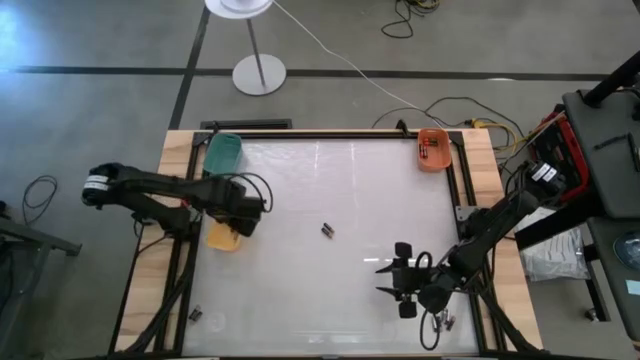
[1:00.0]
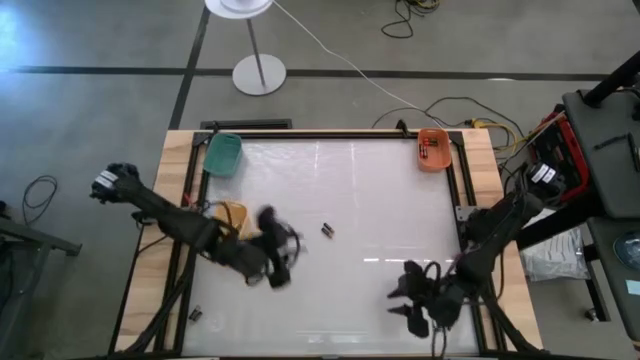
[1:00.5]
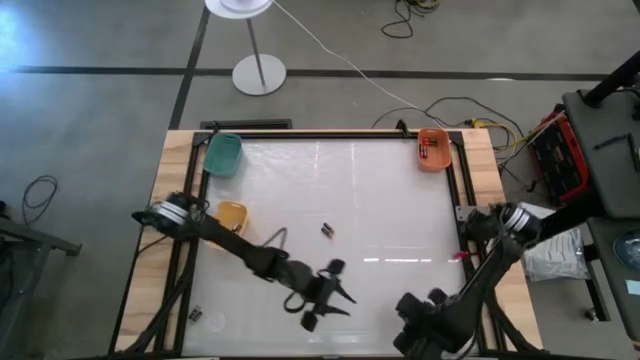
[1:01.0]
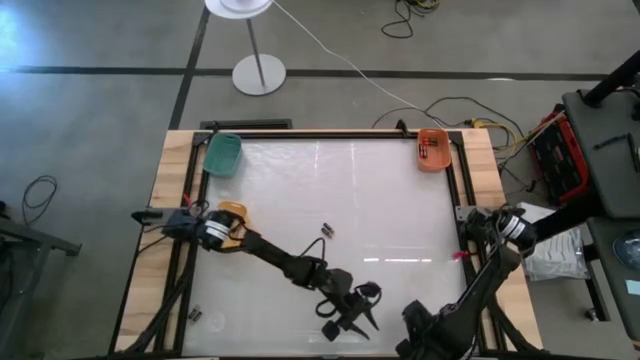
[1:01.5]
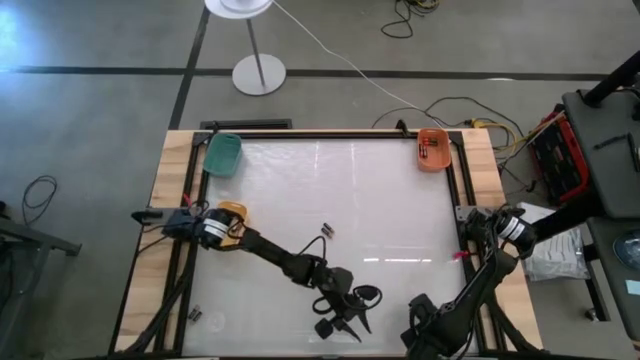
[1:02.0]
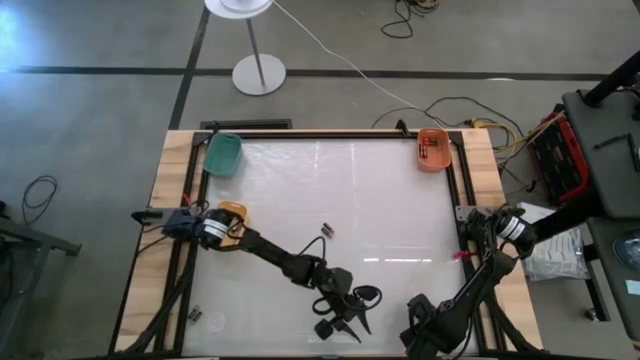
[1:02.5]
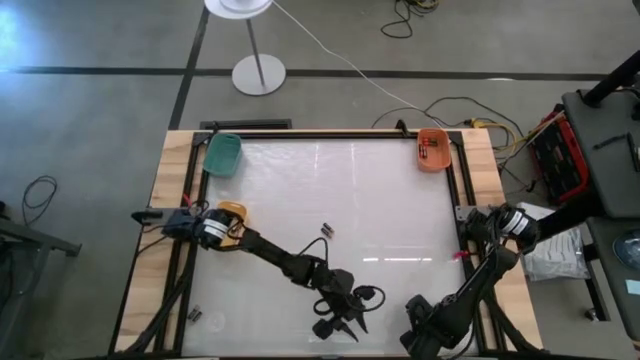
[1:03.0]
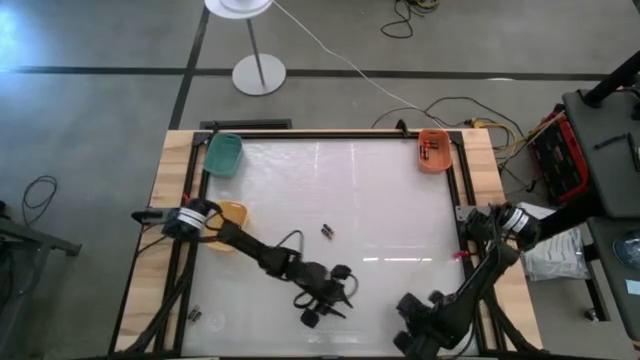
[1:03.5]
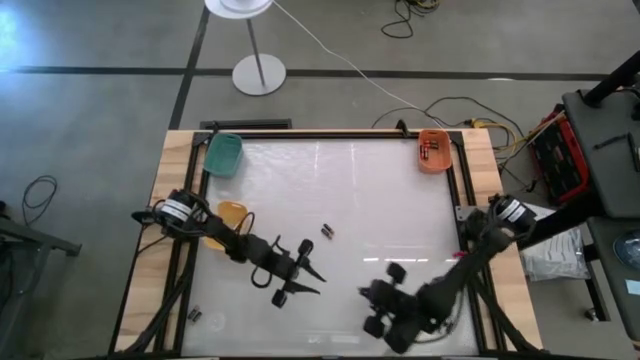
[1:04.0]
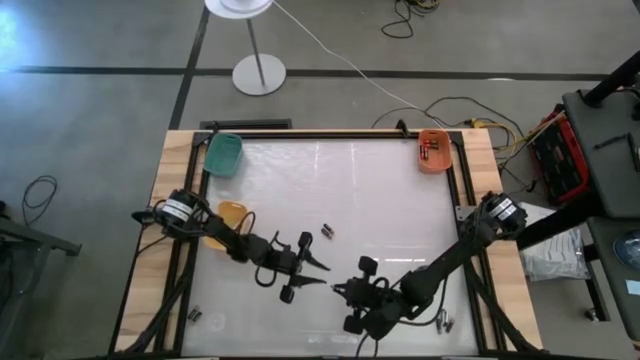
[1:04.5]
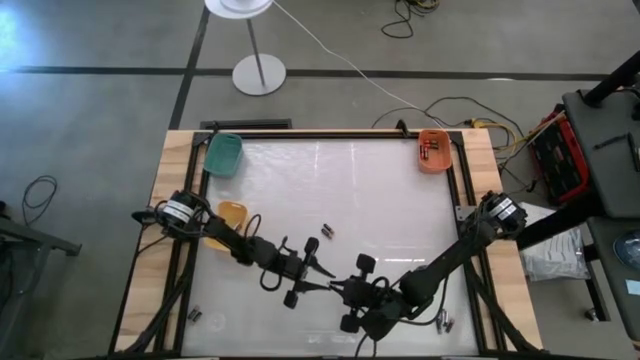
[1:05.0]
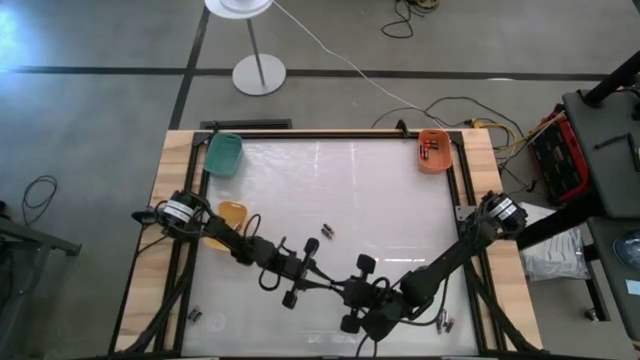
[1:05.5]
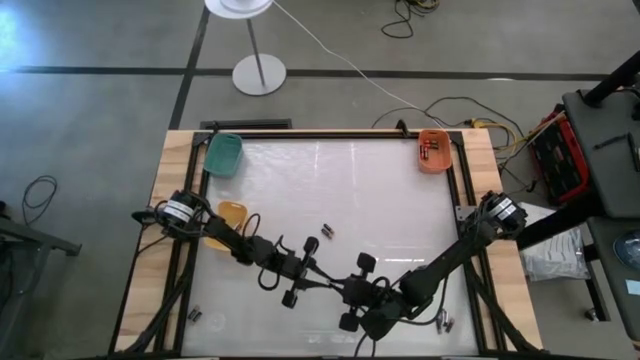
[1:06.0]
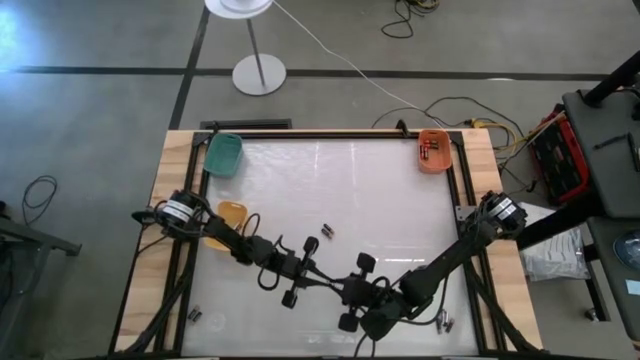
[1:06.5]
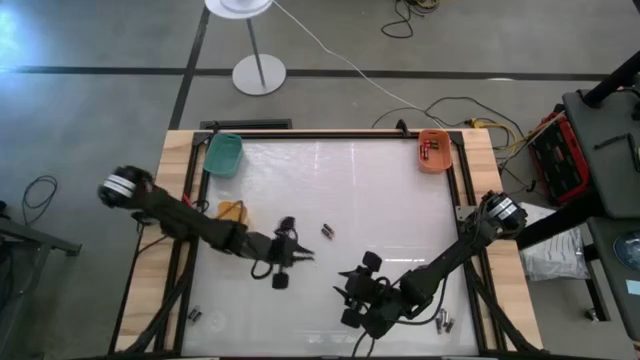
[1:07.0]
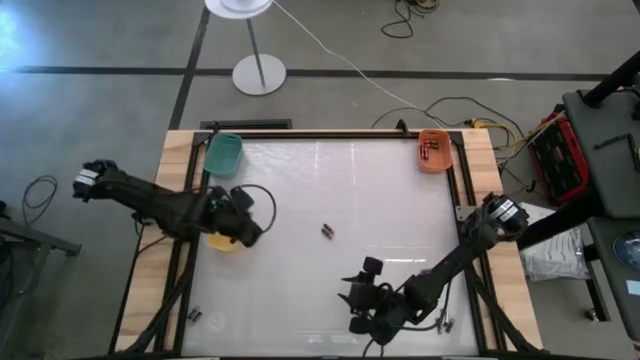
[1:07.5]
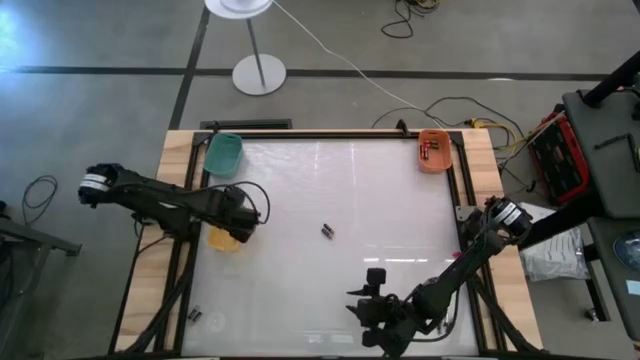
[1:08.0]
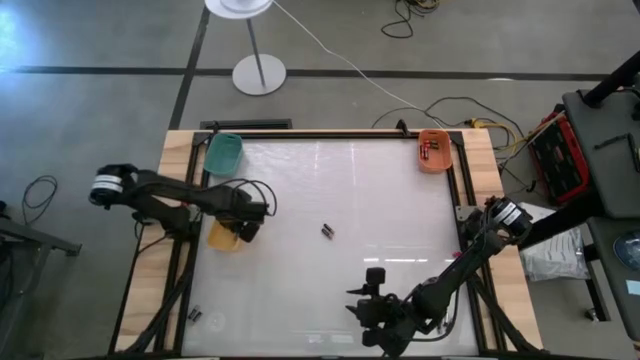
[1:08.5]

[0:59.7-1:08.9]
Task: Sort batteries
Put the silver battery into the yellow bin

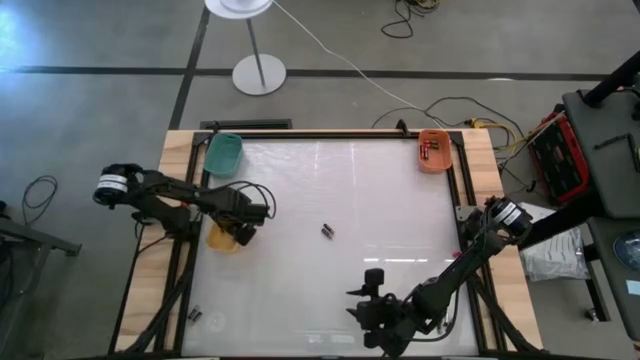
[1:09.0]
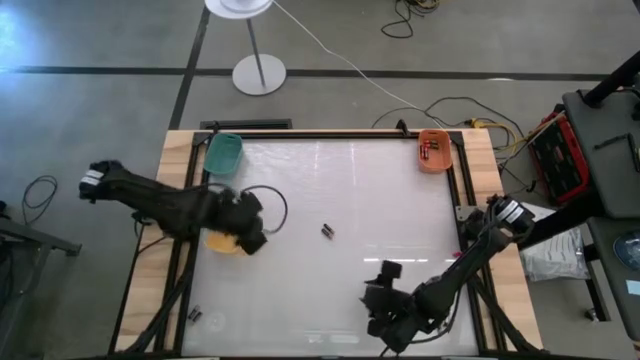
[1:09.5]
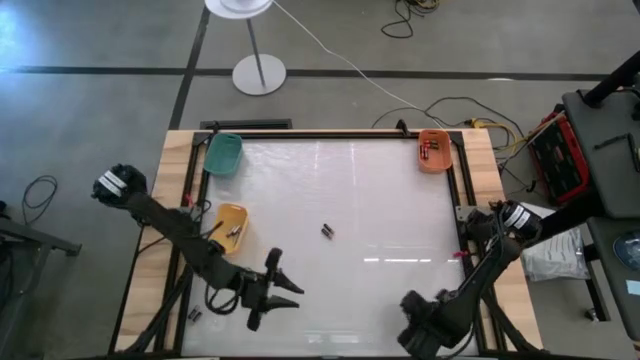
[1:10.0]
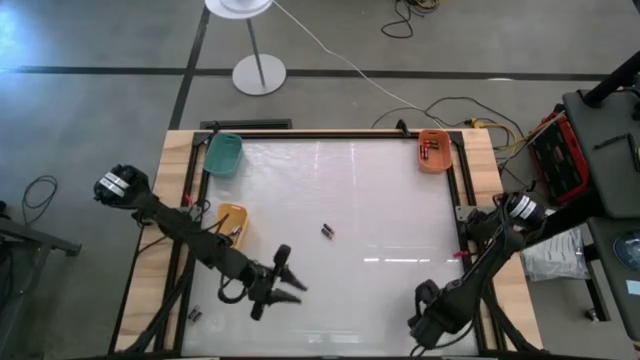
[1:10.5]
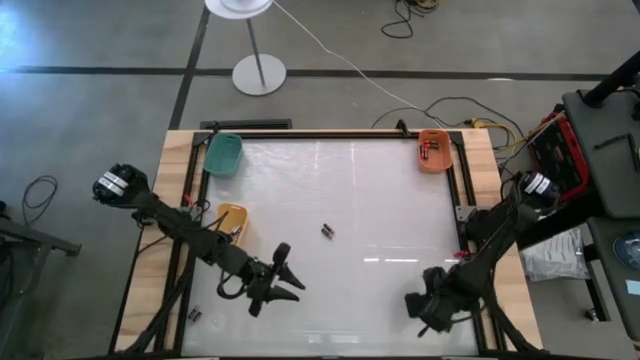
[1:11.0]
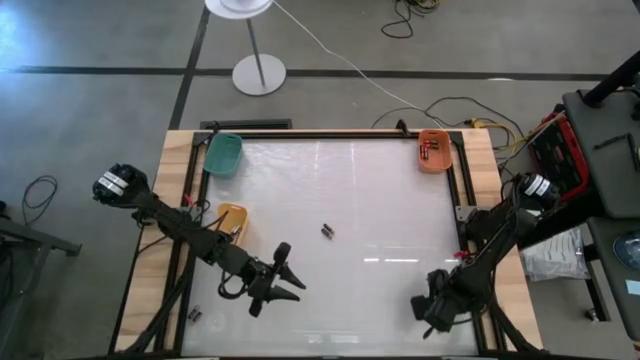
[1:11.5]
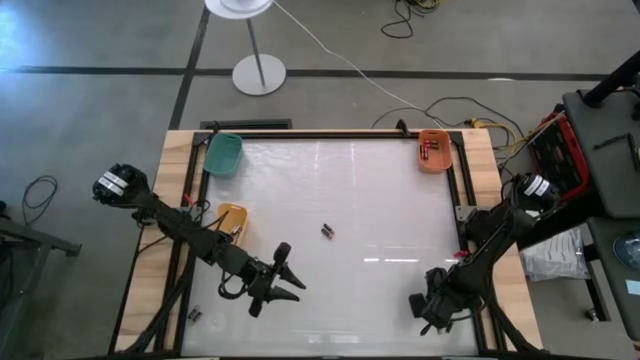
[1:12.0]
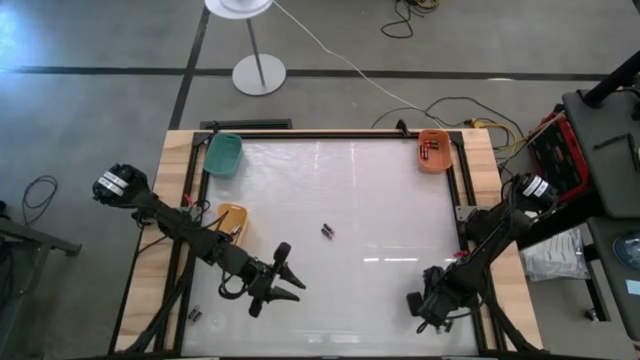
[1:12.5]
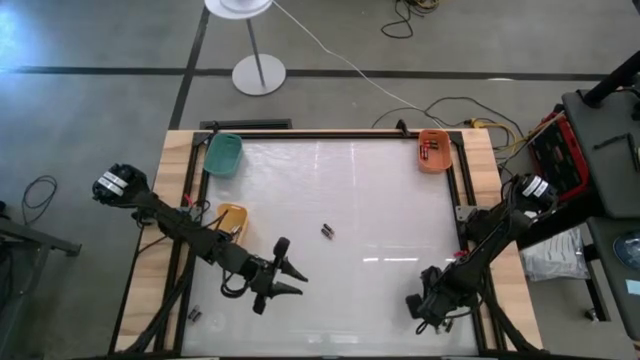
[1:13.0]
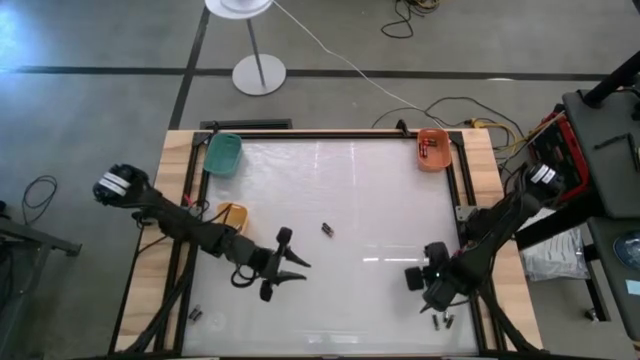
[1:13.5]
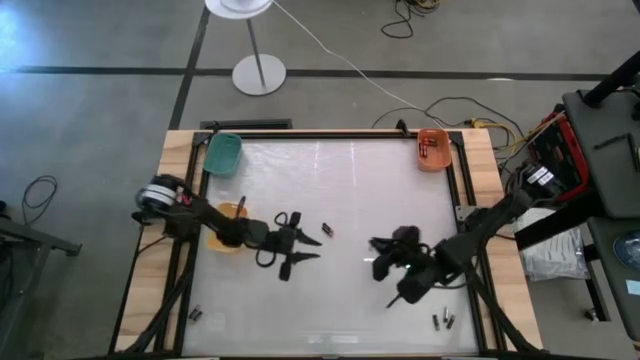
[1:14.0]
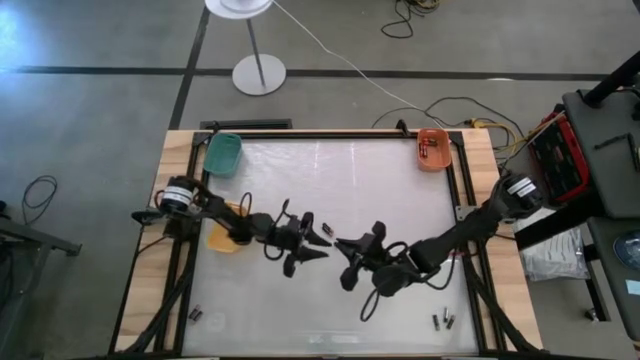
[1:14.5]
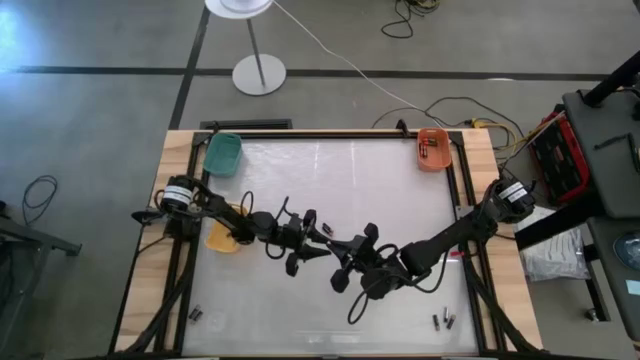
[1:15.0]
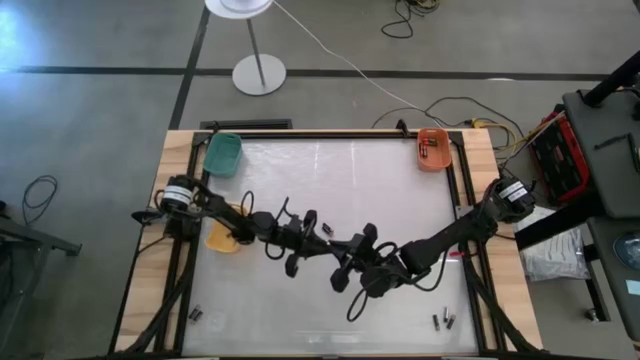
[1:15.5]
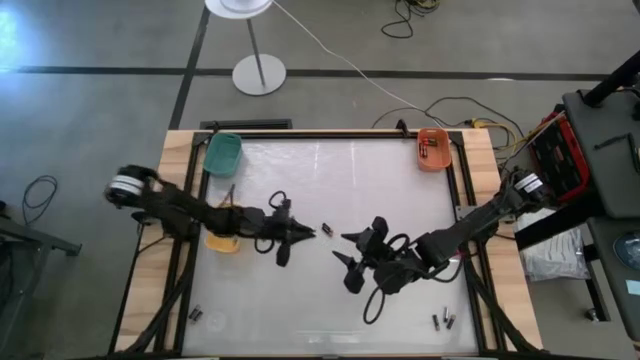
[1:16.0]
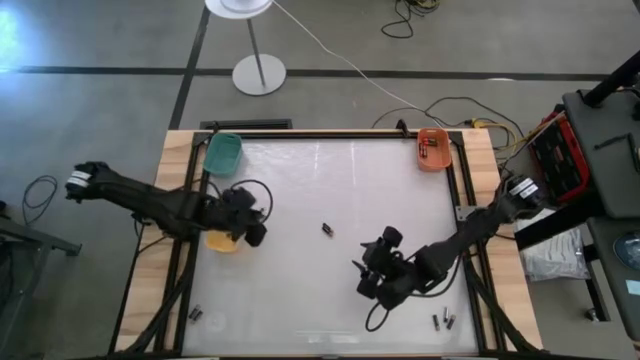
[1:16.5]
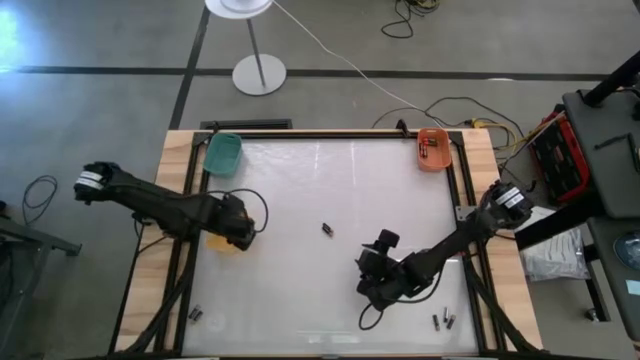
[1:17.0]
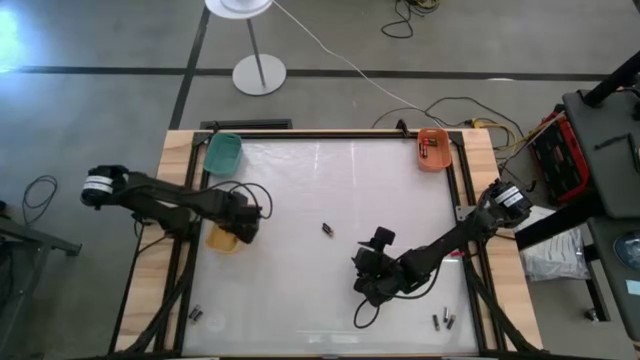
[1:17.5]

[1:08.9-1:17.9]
Put the silver battery into the yellow bin

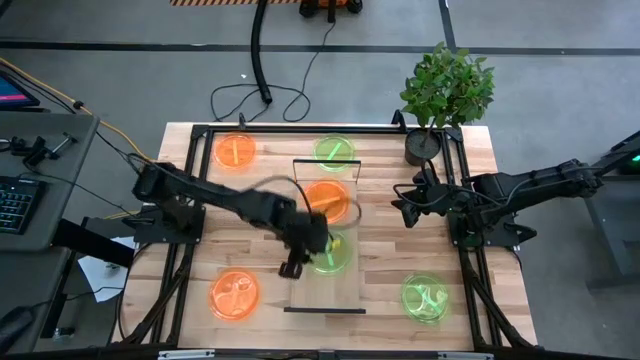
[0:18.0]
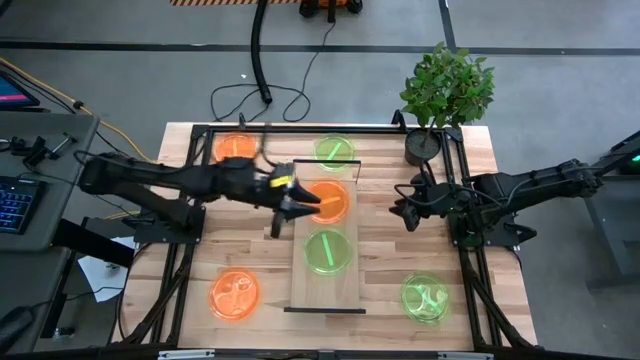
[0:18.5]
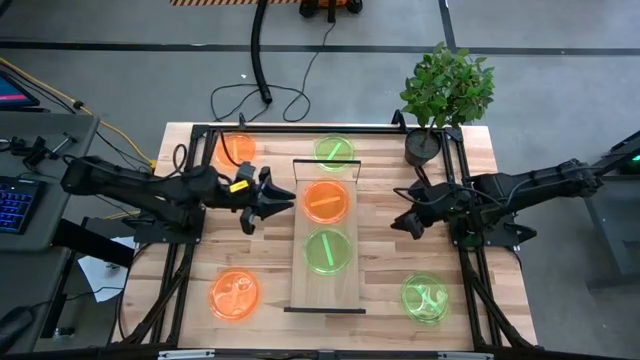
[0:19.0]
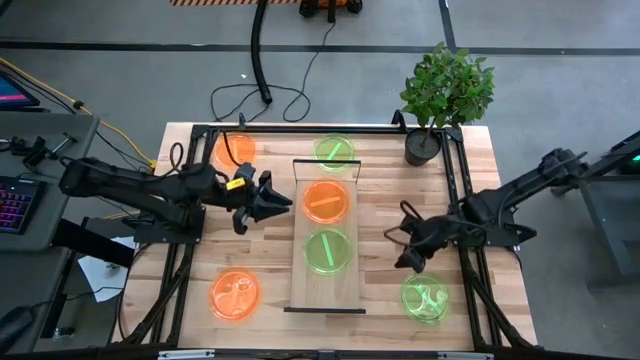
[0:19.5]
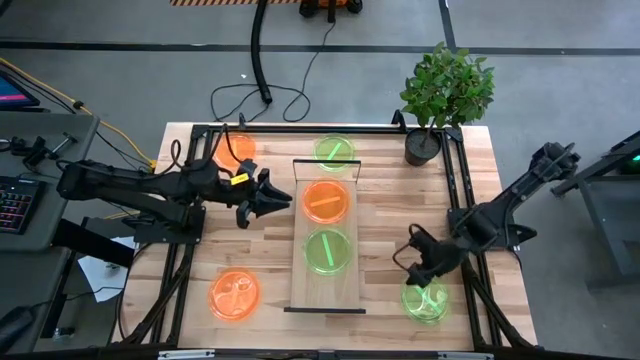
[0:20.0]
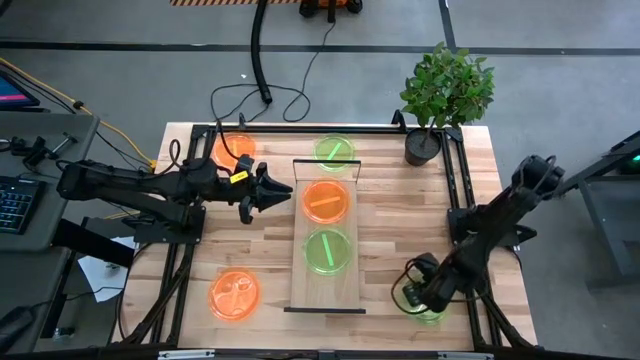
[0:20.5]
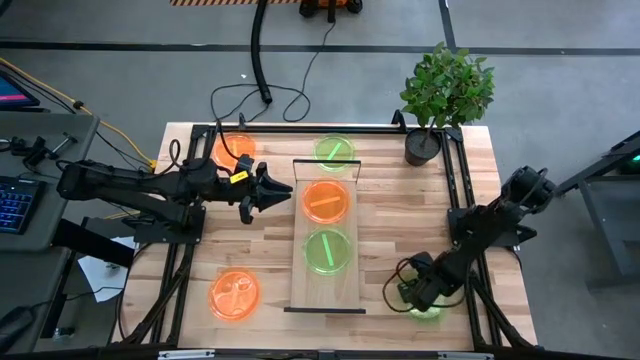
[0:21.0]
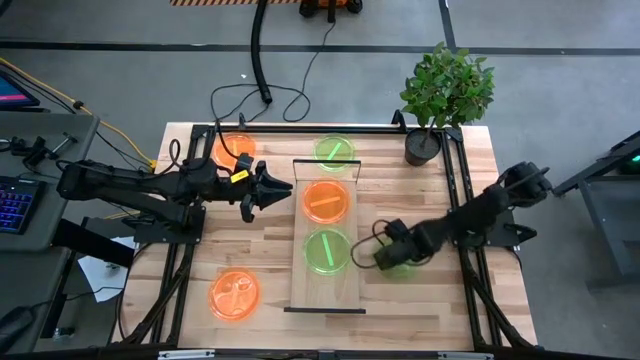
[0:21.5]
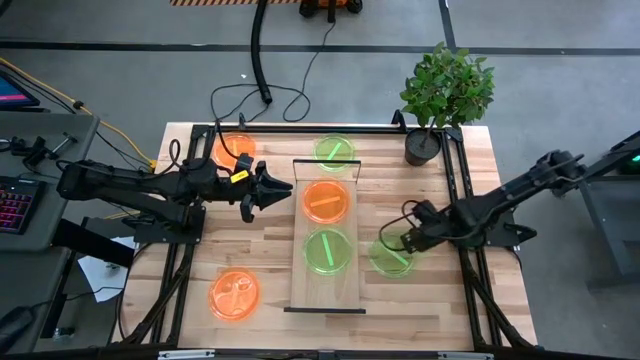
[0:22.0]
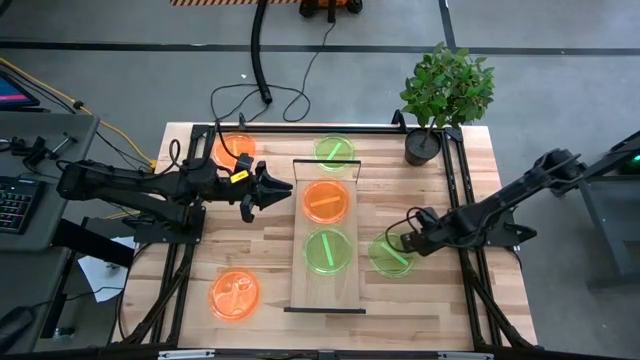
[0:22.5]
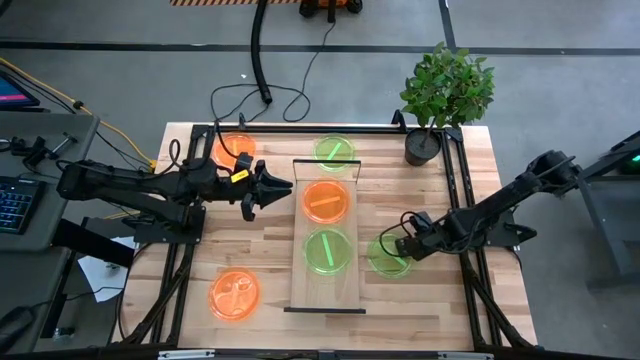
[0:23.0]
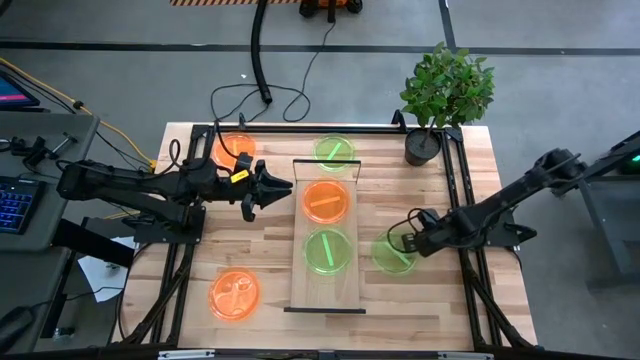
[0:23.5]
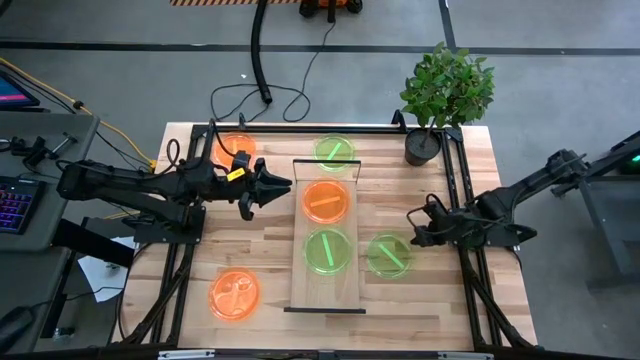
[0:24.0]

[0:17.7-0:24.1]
Task: Place and stack plates onto a shelf
Stack the bottom green plate on top of the green plate on the shelf
